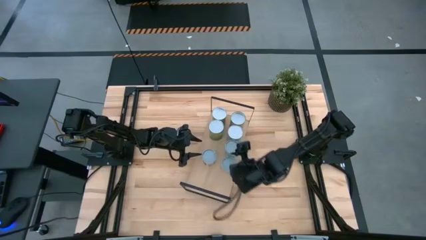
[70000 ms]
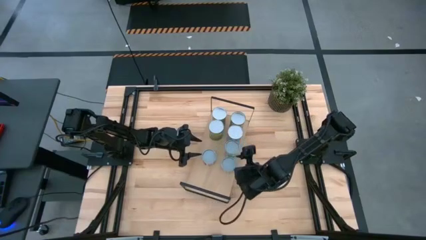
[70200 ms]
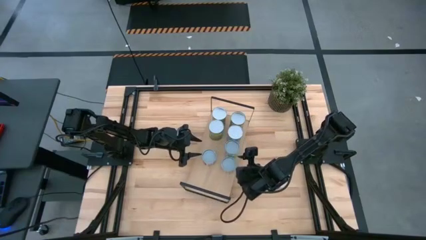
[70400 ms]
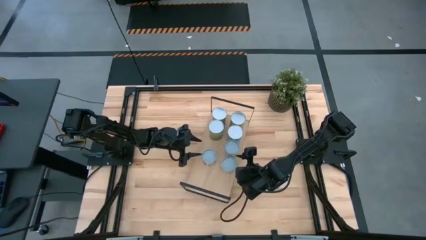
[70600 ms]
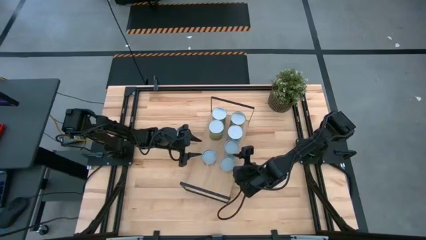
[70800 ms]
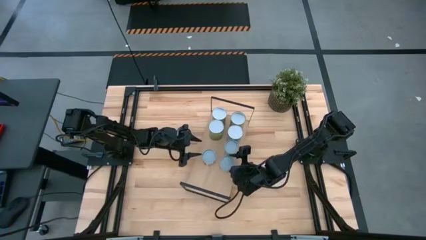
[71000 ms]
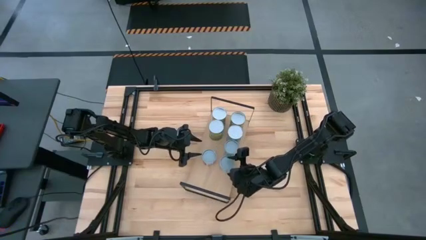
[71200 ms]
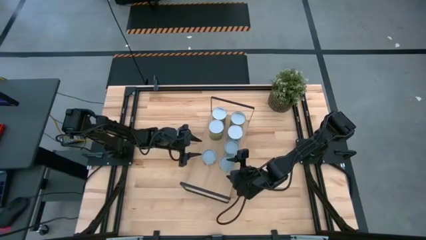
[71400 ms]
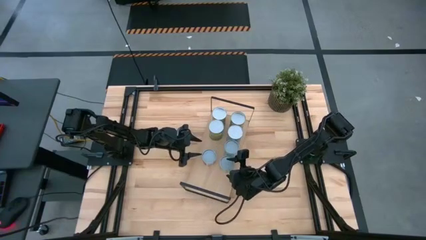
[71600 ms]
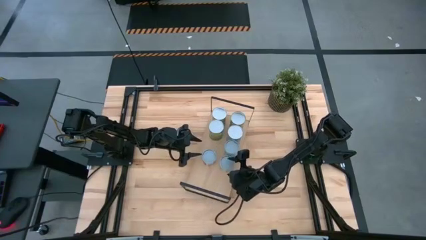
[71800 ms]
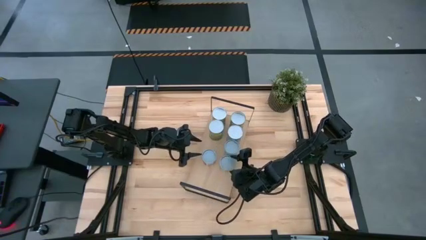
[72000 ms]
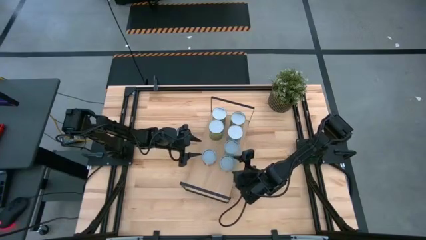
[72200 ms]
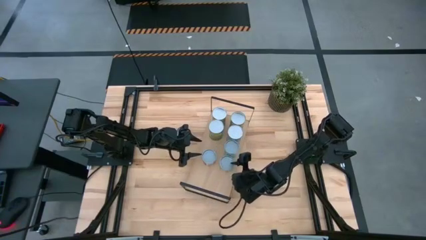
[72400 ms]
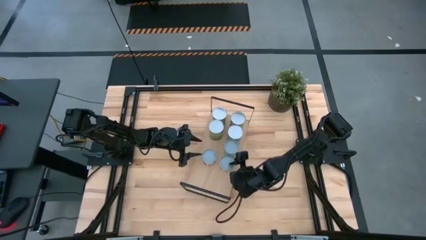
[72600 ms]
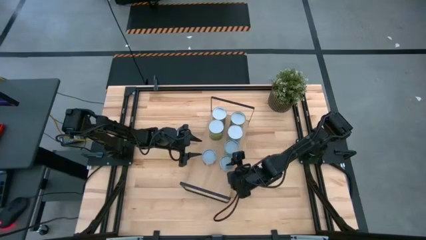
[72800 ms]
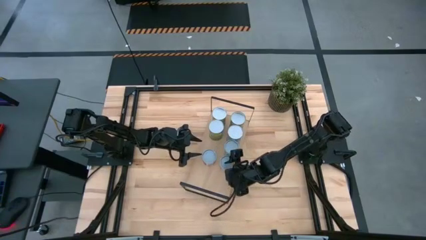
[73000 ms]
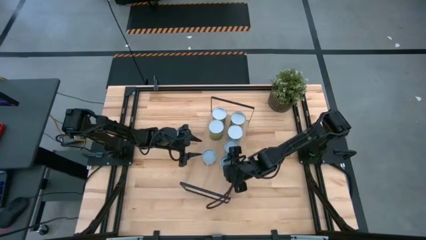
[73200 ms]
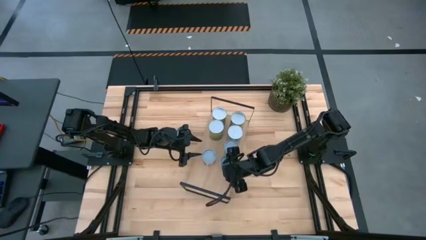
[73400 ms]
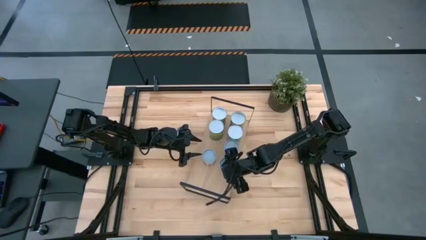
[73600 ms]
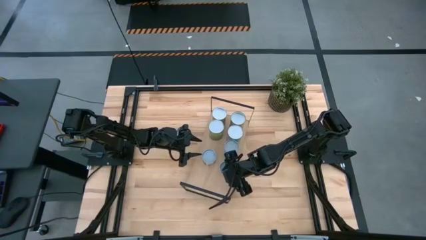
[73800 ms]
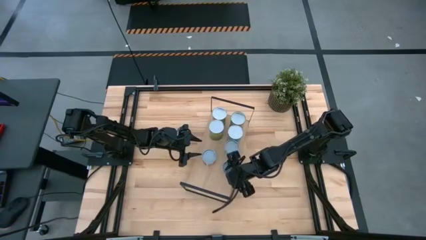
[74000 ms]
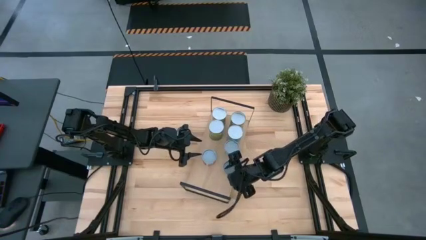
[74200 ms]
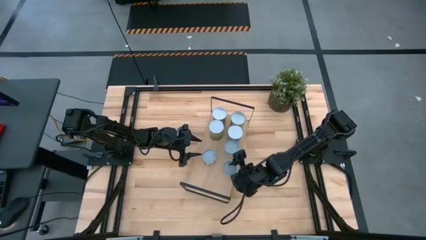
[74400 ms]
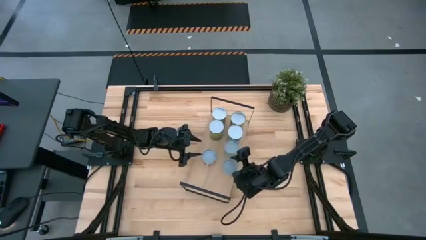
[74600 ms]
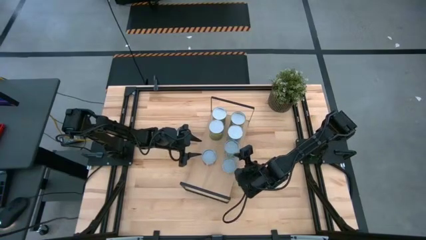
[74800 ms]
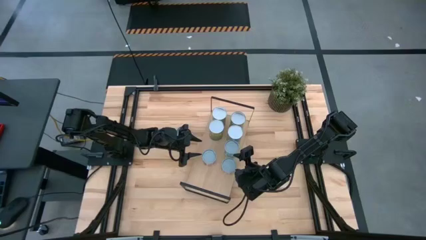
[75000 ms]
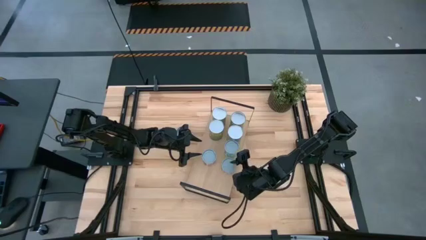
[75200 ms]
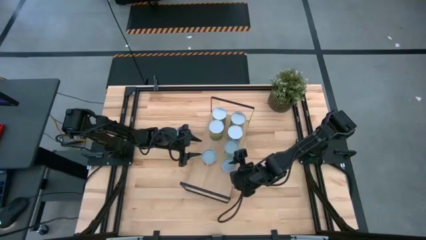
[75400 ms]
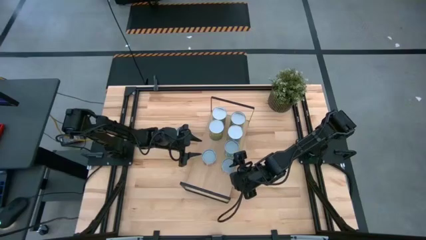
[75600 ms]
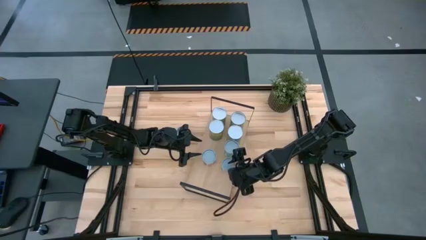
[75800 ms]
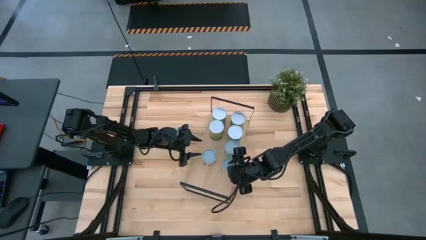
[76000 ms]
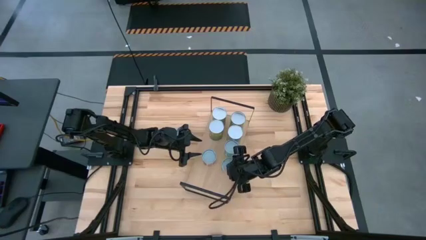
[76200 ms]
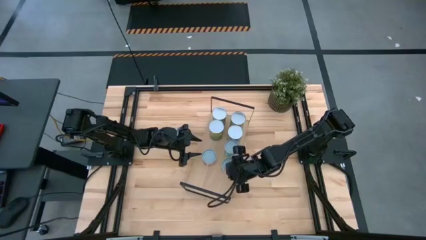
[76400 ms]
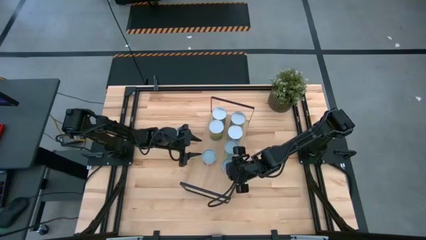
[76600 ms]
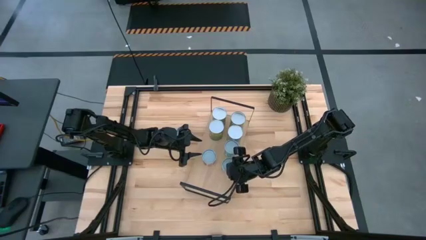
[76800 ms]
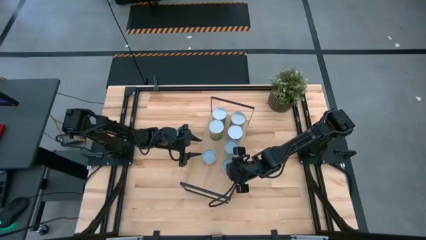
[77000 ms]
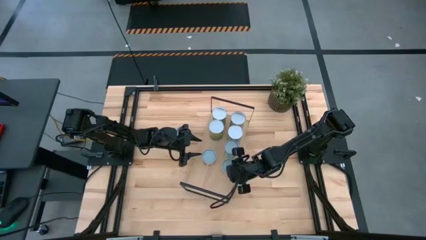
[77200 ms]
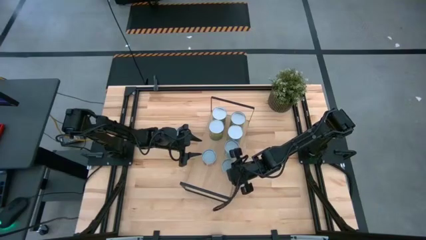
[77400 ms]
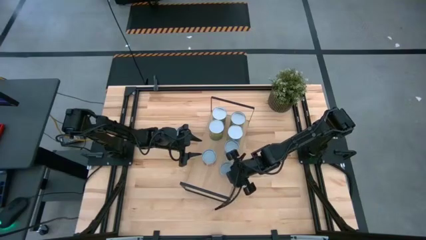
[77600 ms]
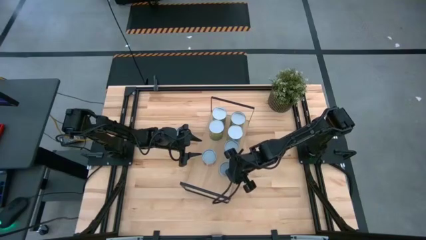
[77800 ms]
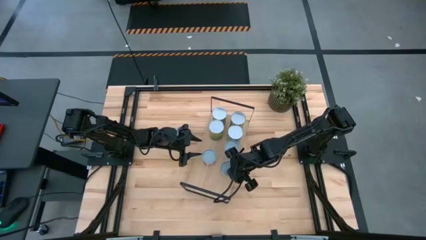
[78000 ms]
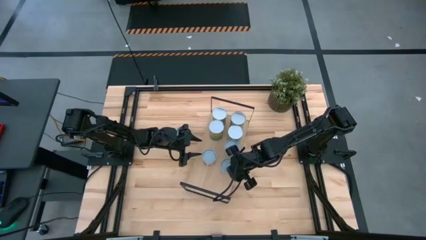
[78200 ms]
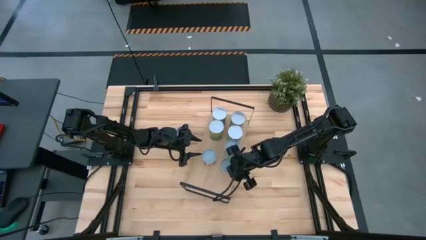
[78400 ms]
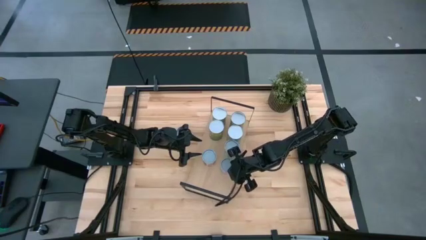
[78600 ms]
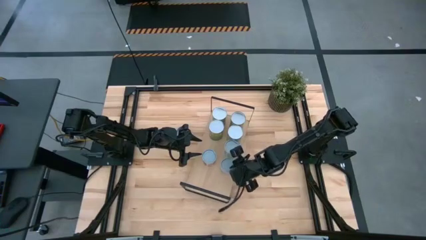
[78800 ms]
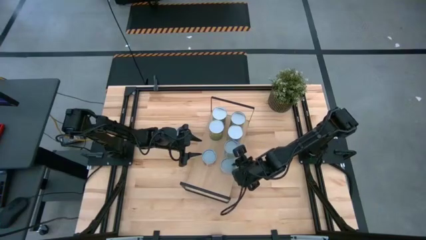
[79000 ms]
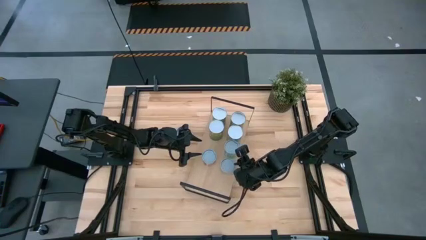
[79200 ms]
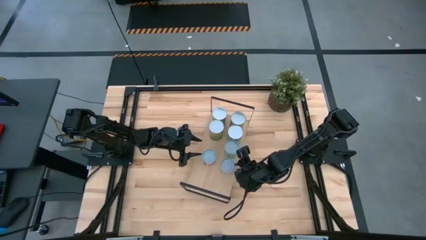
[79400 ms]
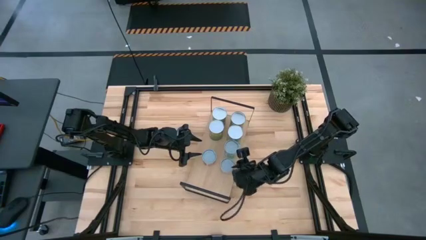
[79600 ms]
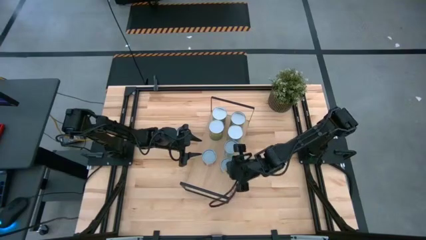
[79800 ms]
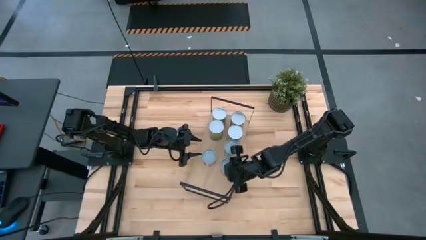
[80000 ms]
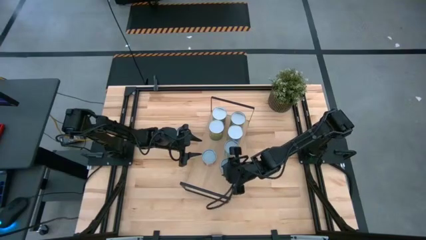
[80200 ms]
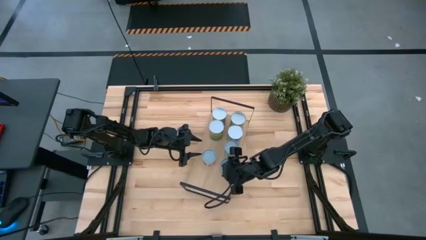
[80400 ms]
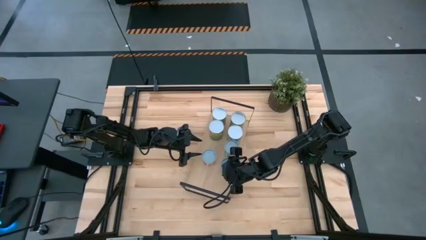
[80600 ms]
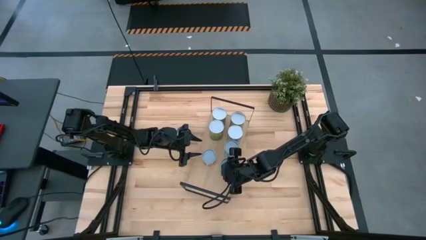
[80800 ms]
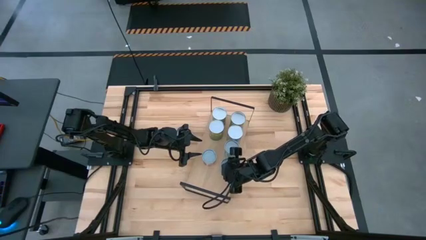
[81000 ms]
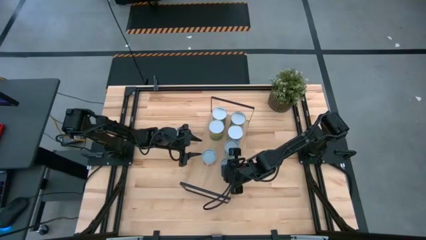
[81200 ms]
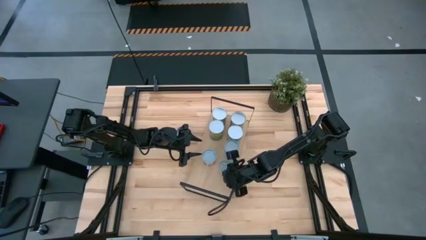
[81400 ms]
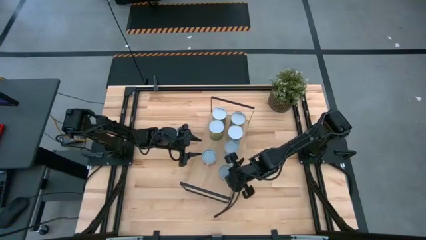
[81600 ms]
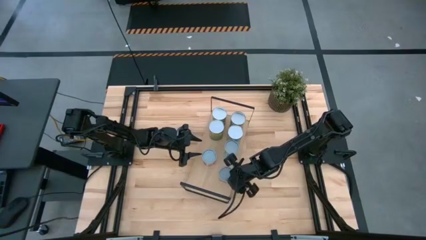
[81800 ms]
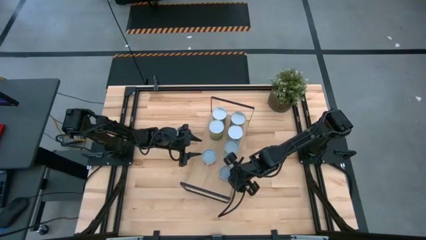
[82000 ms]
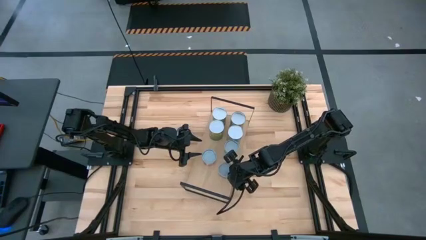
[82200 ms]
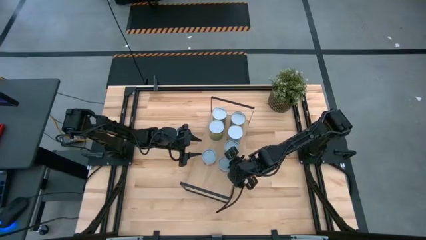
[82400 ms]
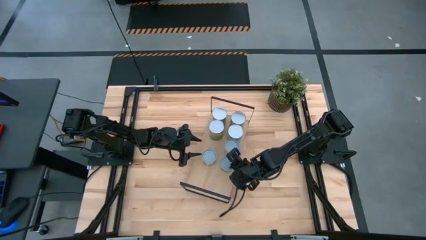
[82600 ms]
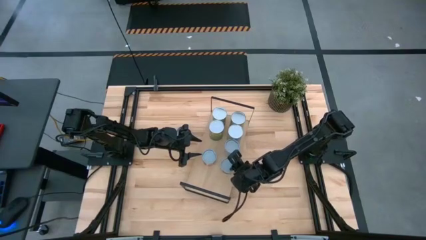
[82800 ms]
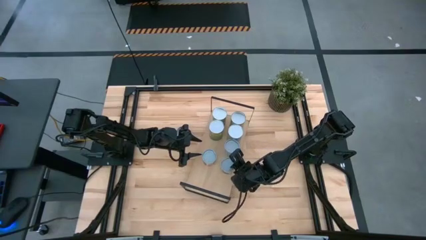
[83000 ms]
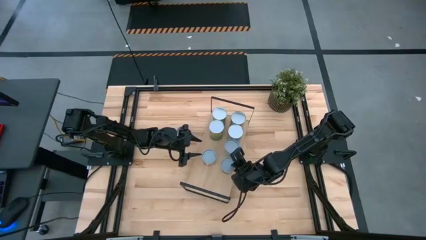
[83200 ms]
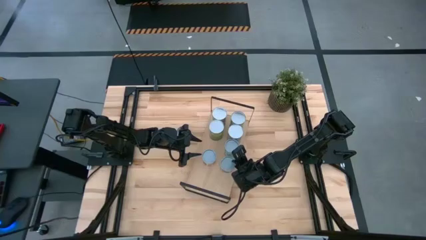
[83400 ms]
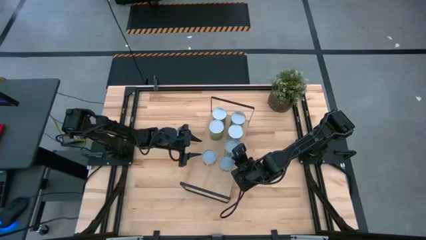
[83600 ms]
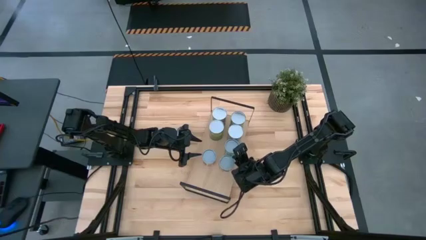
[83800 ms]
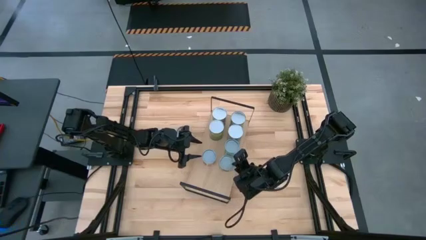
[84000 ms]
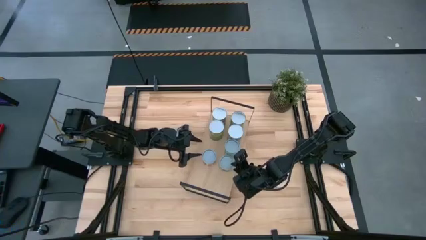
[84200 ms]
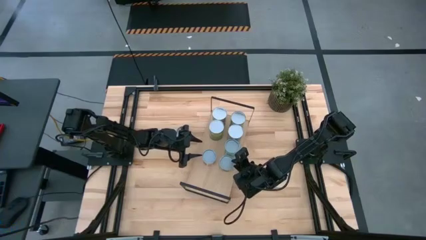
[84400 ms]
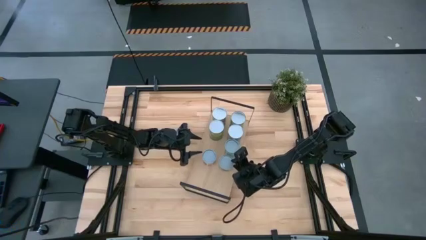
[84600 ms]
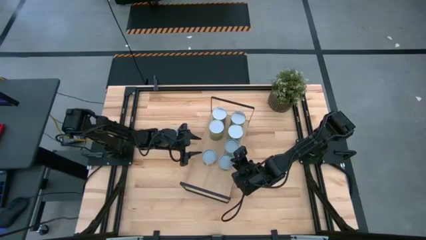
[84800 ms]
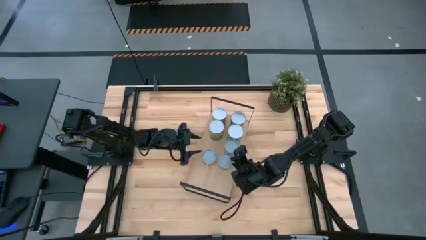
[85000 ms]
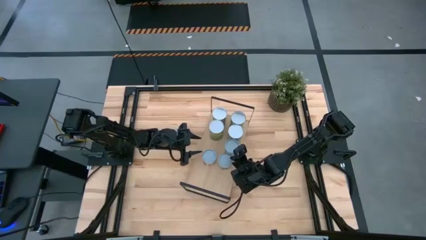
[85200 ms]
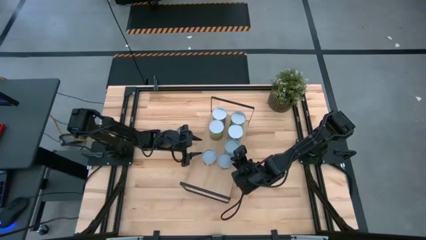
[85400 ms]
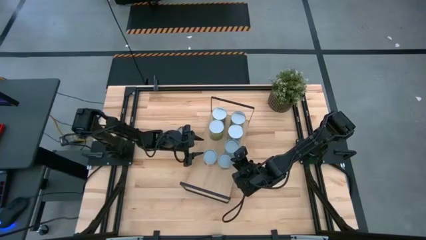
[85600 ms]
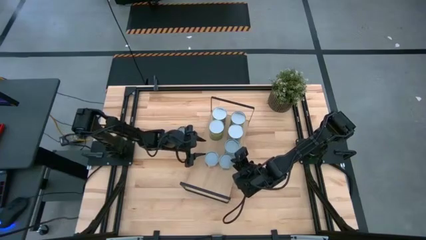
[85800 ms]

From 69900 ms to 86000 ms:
Task: Pick and place cans onto a shelf
Adjust the cans on the shelf

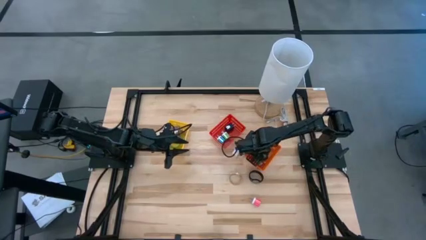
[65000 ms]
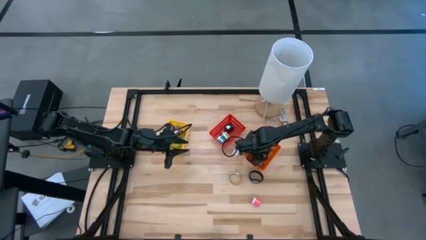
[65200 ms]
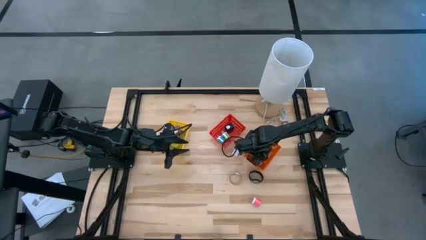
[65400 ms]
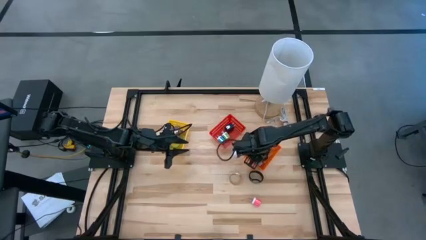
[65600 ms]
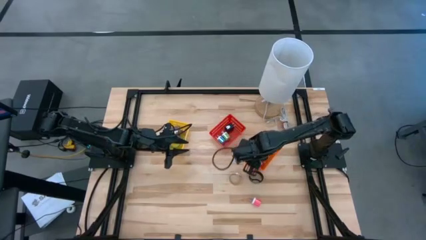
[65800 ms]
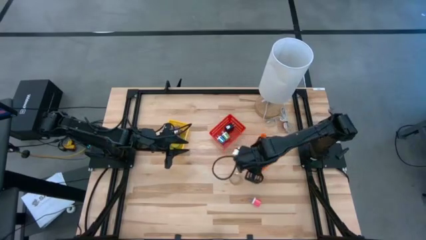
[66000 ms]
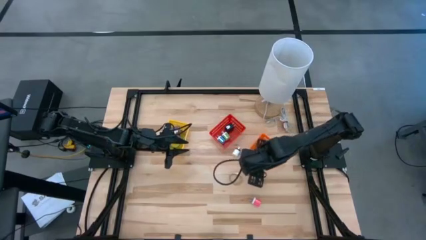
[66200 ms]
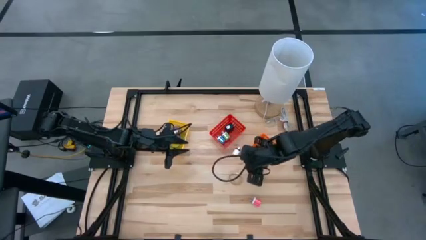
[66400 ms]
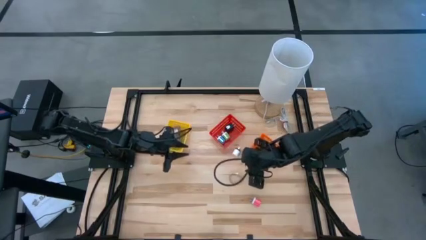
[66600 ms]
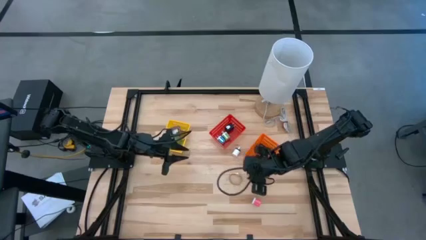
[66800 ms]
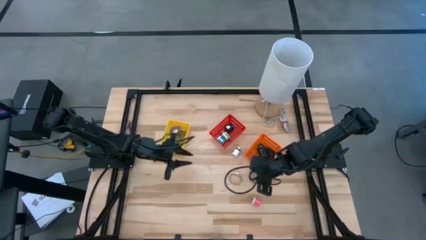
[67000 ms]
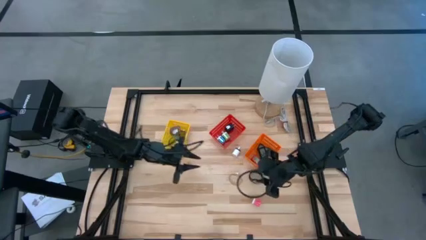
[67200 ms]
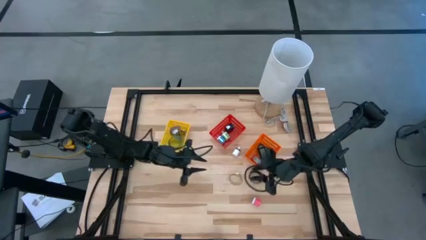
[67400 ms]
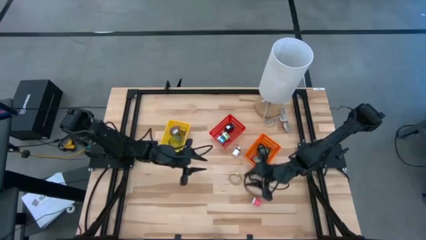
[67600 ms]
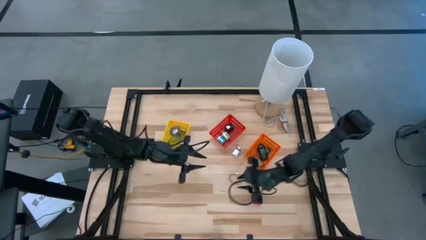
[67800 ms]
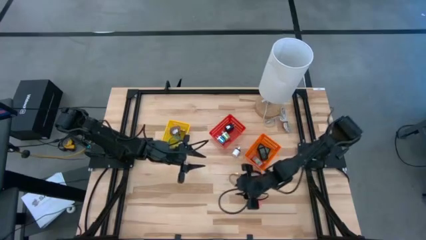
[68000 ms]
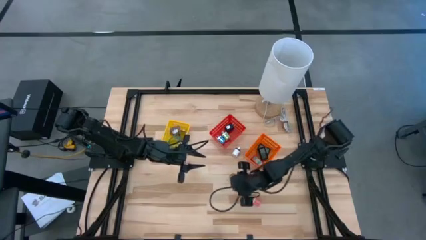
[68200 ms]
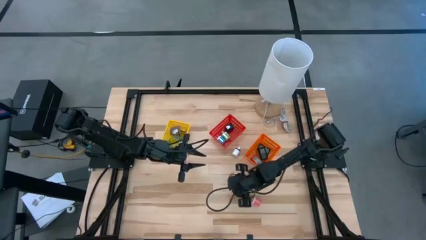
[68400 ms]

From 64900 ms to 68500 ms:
Task: Pick & Place Office items
Put the gold watch into the yellow bin
